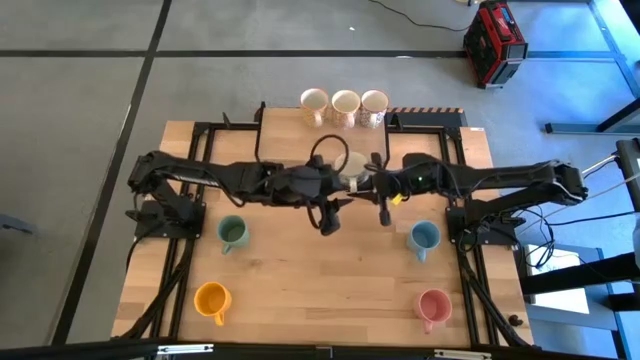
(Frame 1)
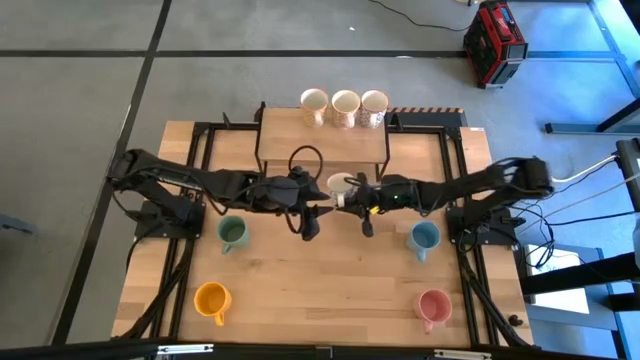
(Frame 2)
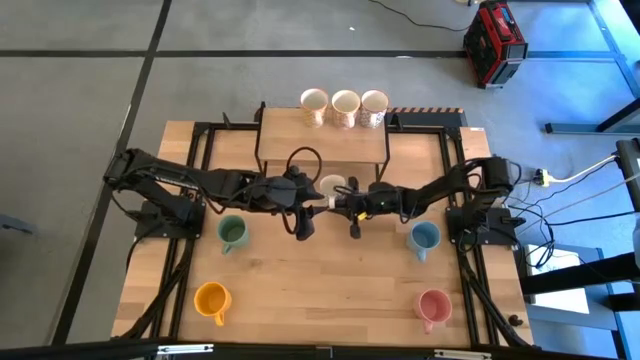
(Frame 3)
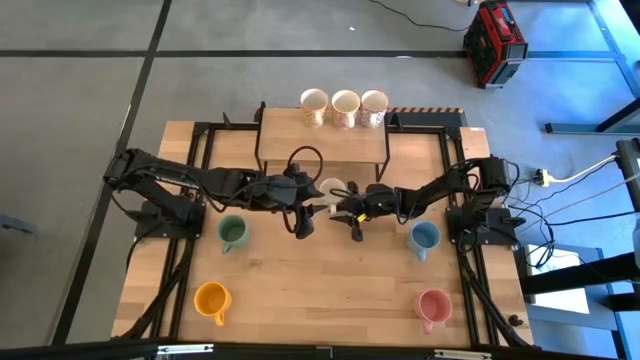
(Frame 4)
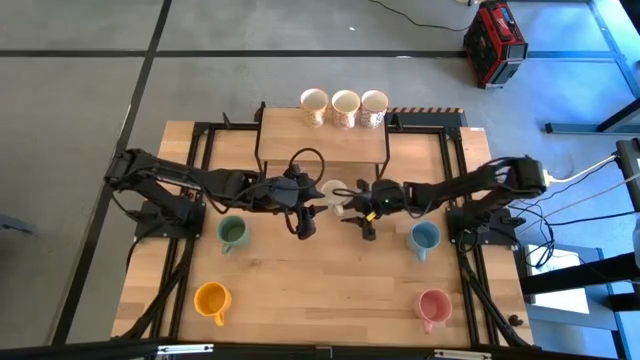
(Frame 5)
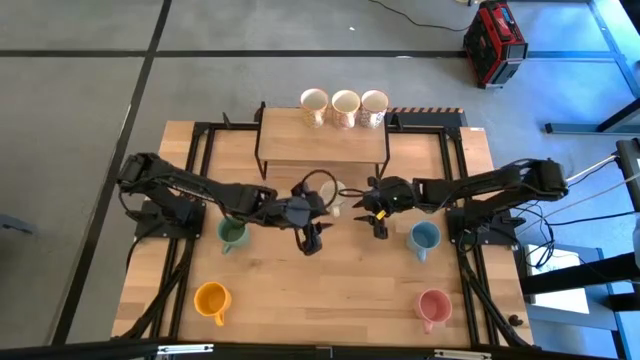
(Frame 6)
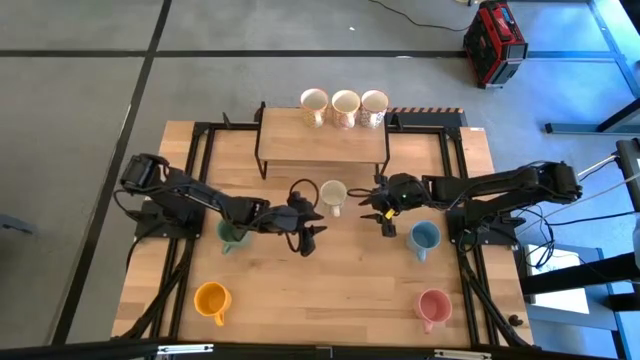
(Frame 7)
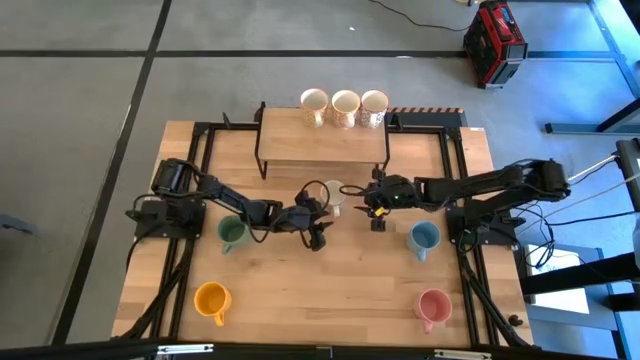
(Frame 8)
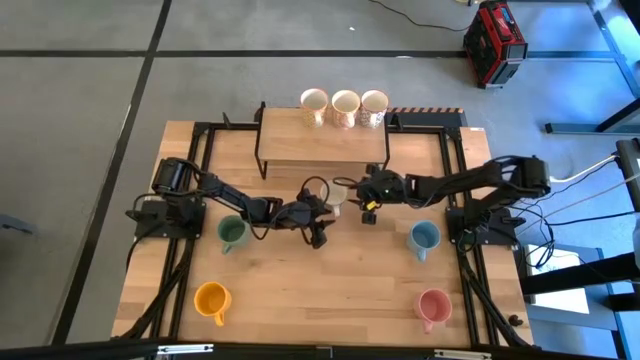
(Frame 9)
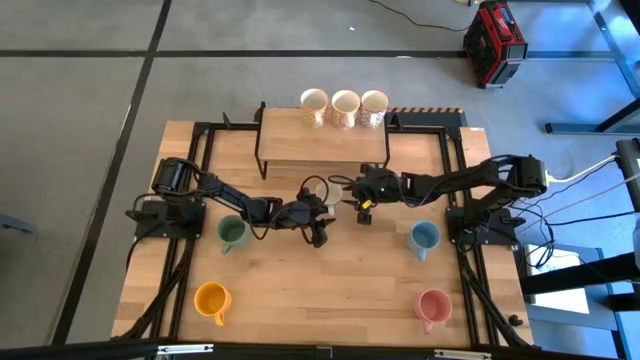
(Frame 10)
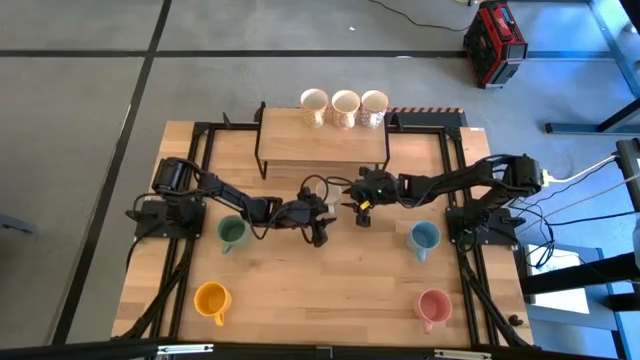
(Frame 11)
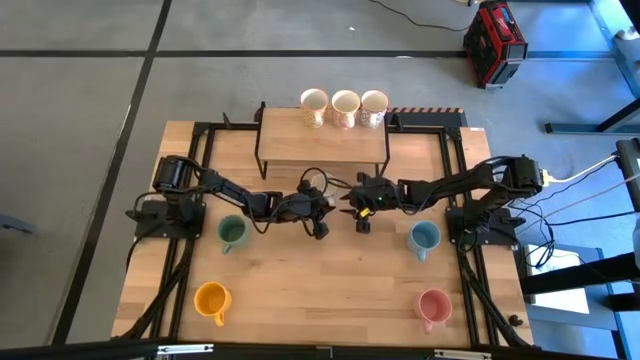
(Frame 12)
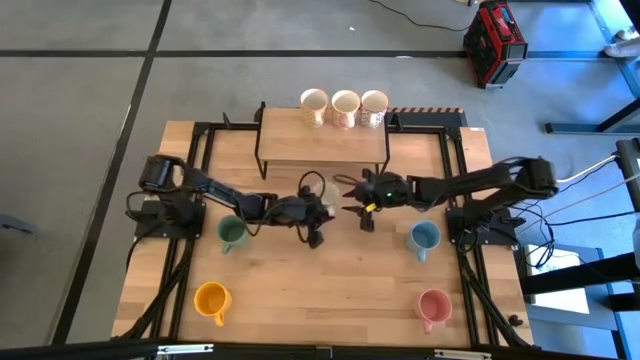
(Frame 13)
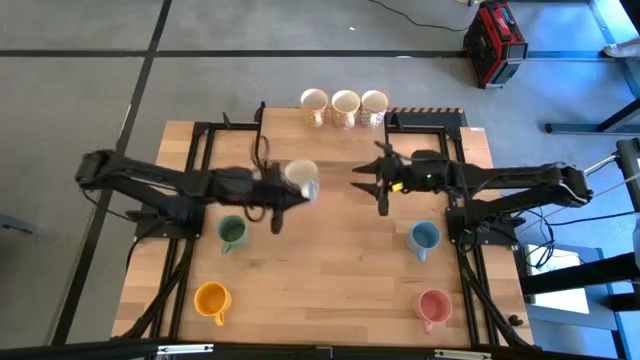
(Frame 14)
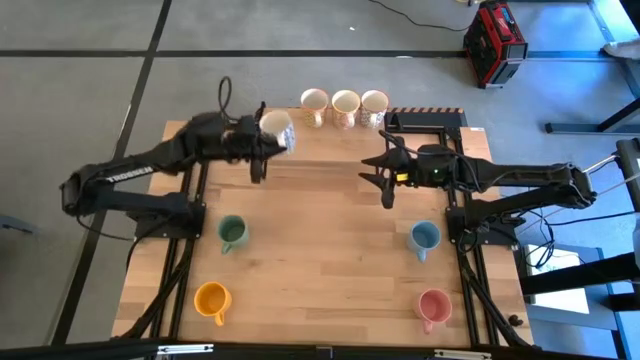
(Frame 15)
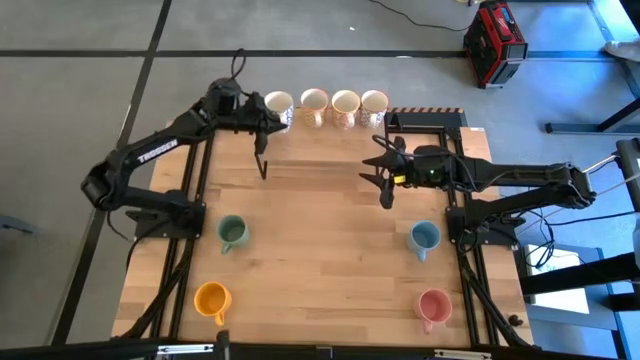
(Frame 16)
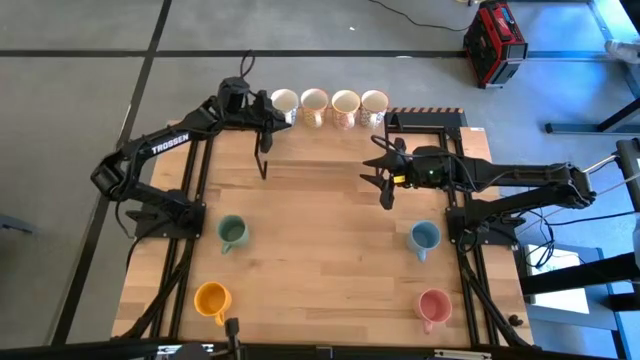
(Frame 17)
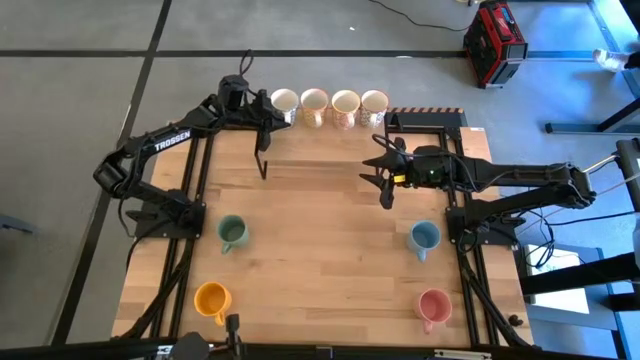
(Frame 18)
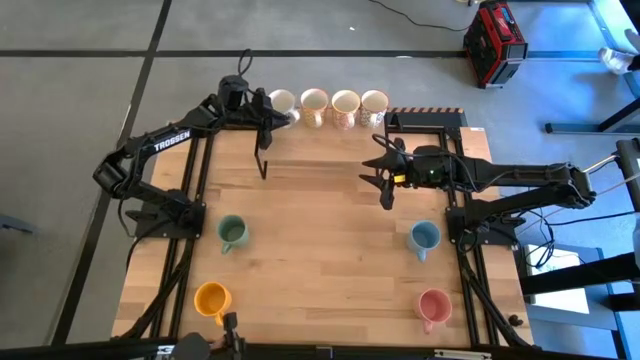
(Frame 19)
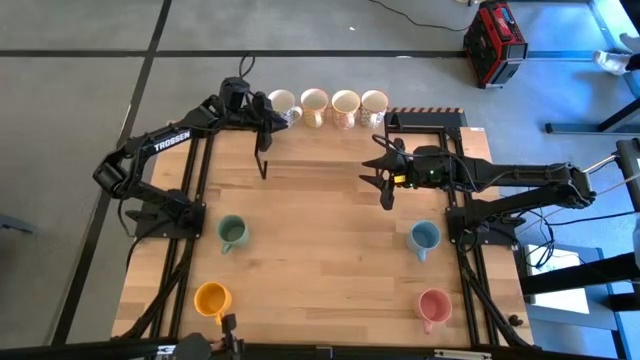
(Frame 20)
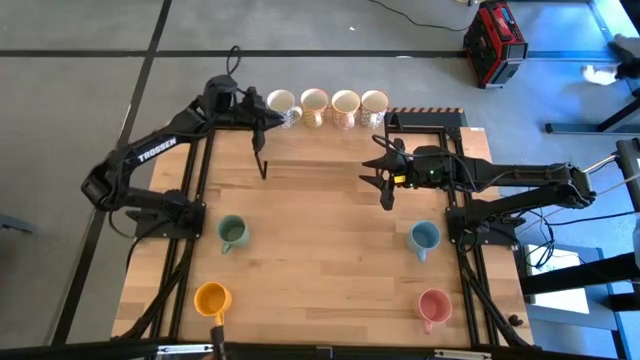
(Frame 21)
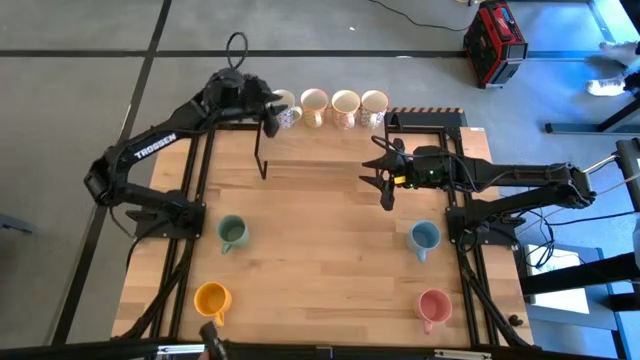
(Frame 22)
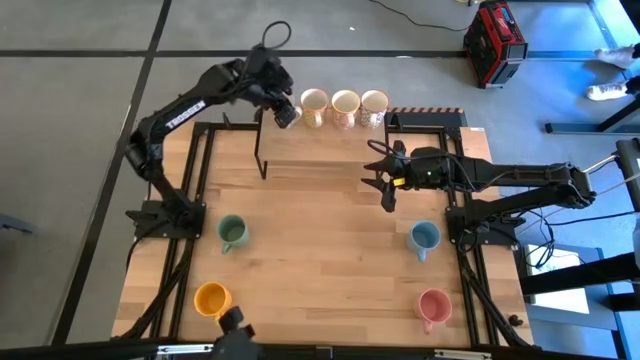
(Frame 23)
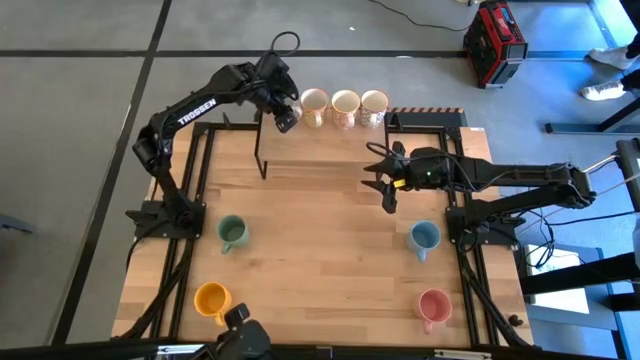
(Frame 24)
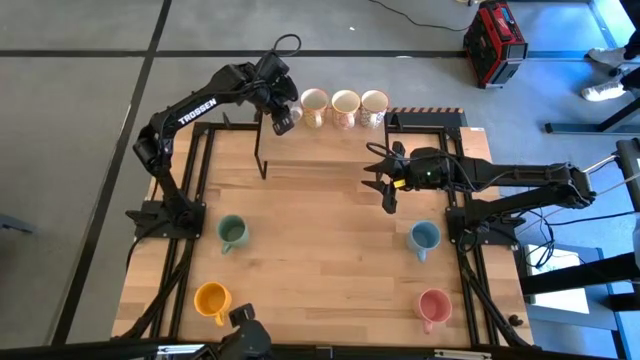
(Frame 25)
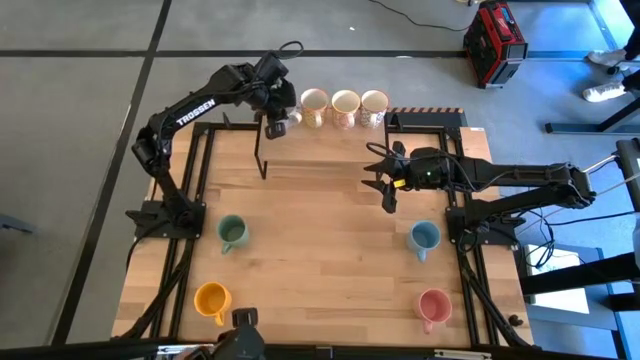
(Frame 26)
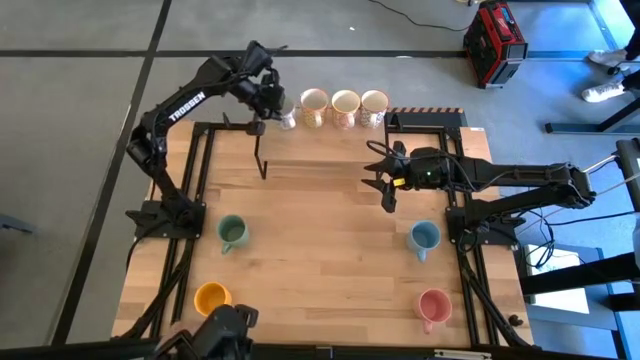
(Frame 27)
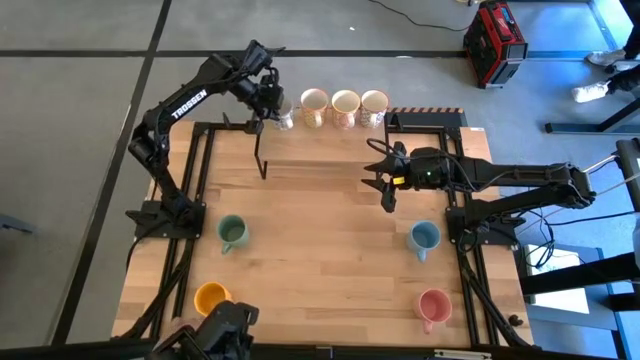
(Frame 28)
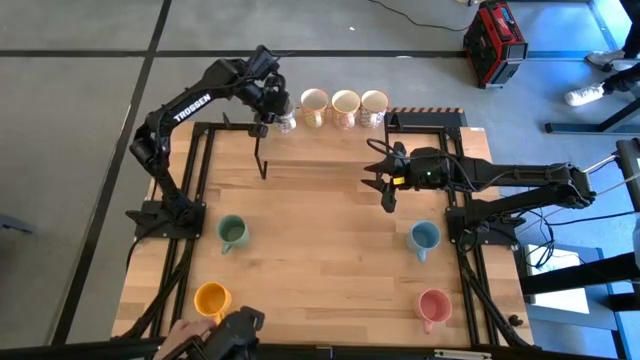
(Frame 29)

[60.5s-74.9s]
Task: Place coffee mugs
Put the blue patterned mug on the shelf

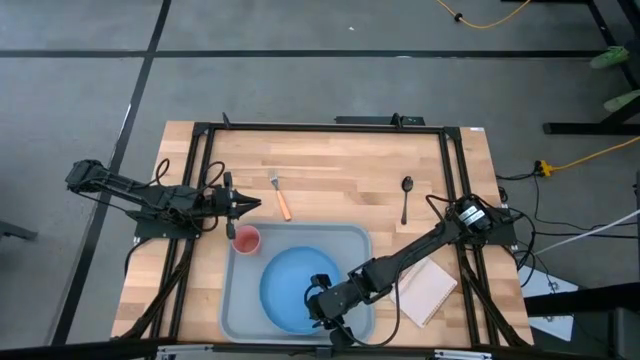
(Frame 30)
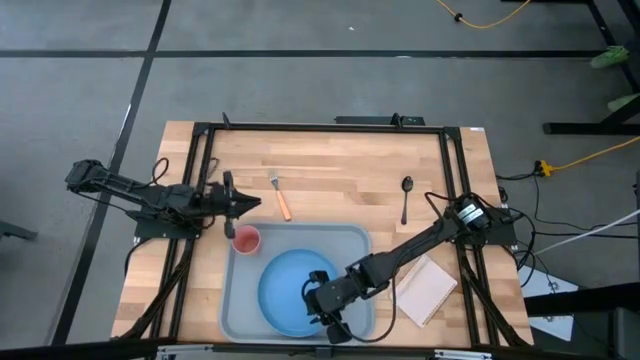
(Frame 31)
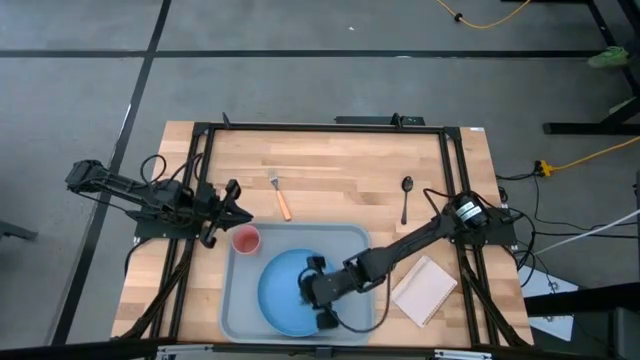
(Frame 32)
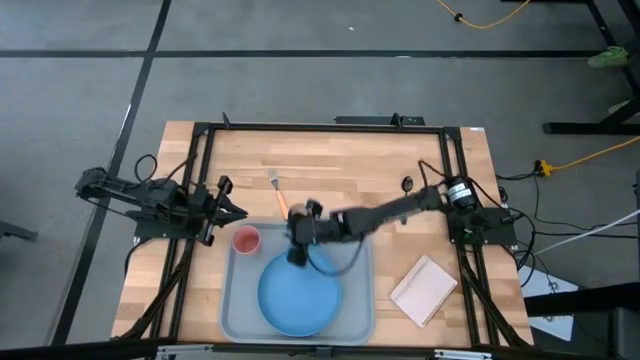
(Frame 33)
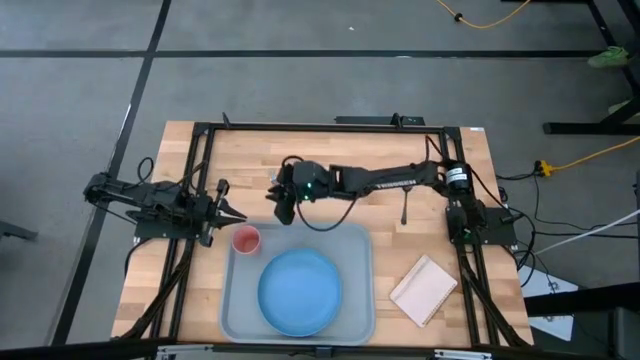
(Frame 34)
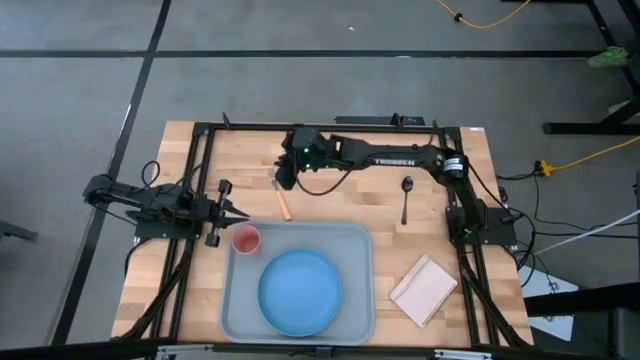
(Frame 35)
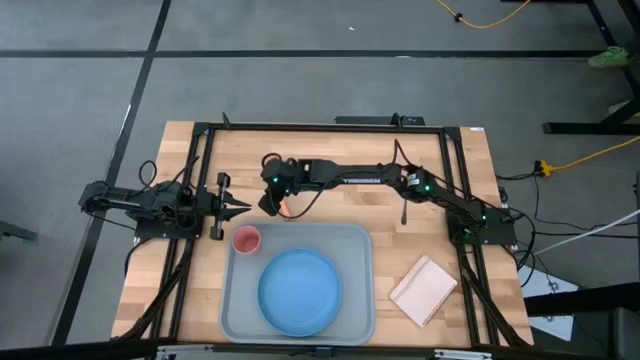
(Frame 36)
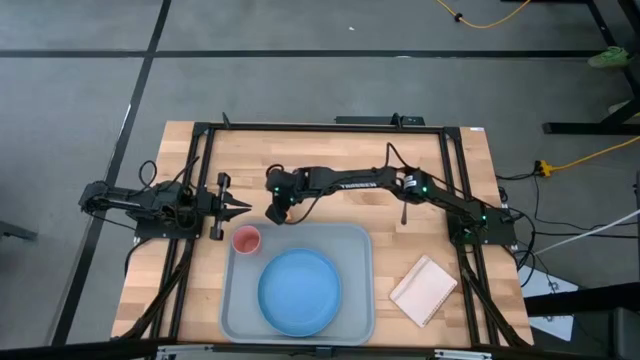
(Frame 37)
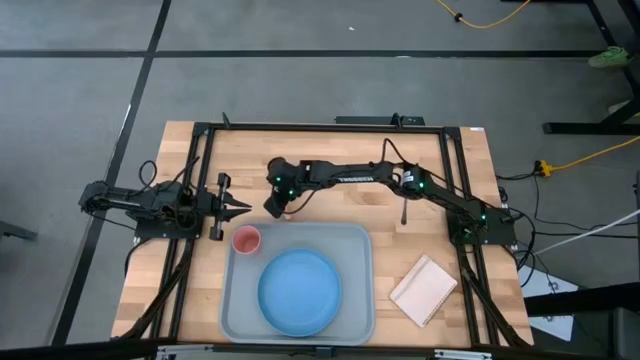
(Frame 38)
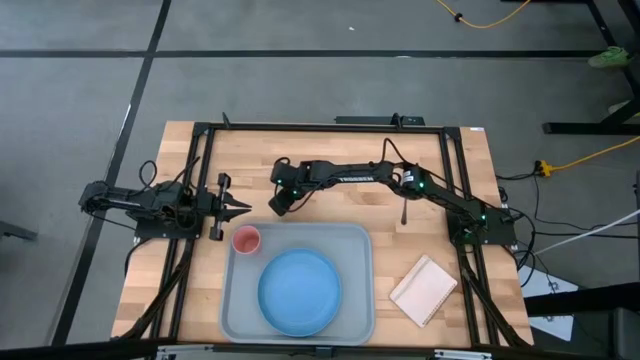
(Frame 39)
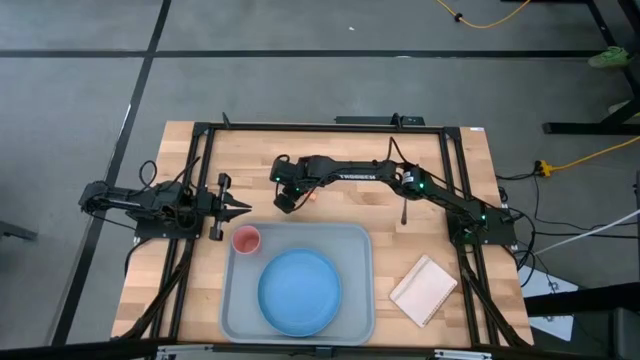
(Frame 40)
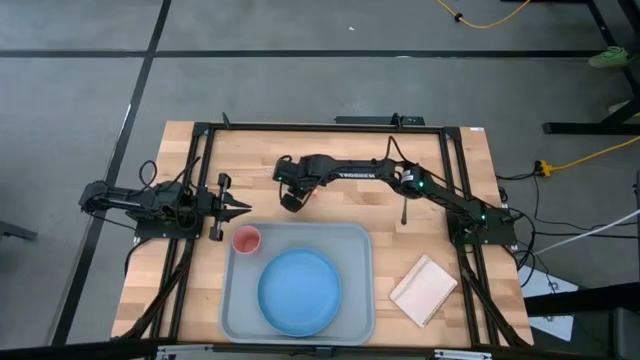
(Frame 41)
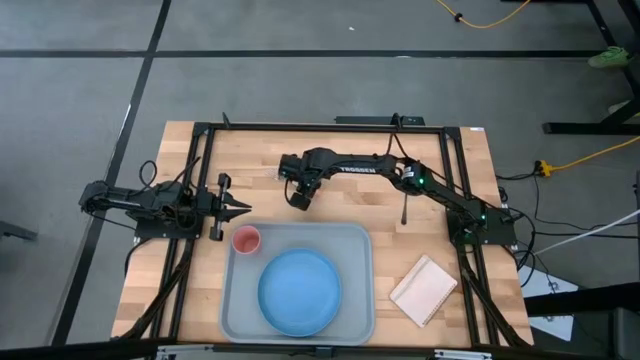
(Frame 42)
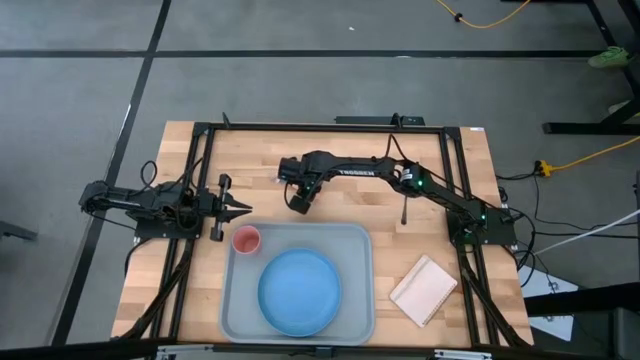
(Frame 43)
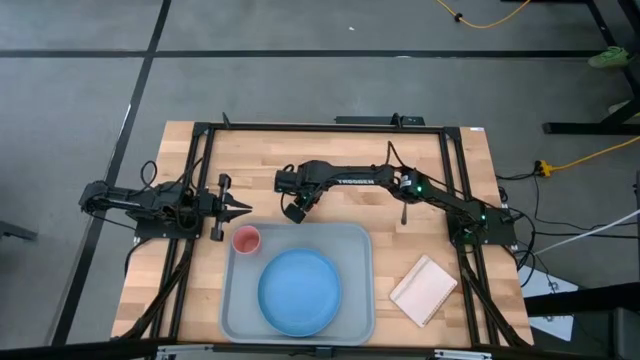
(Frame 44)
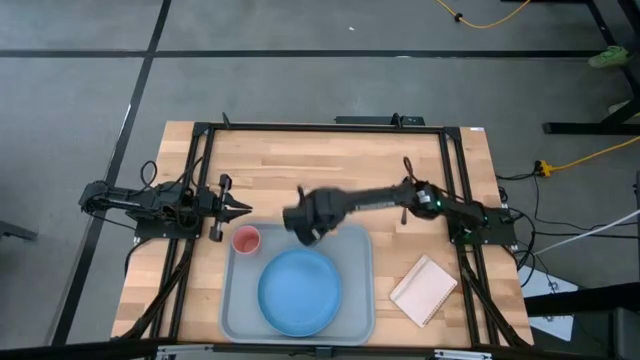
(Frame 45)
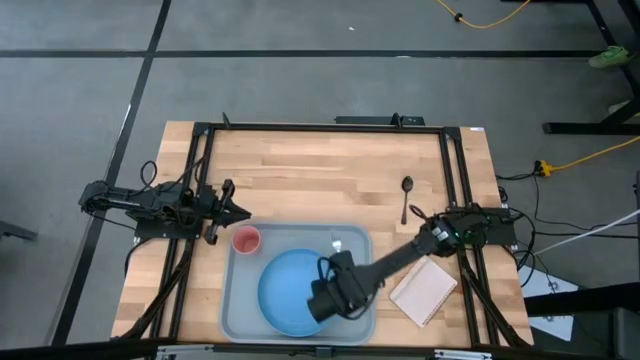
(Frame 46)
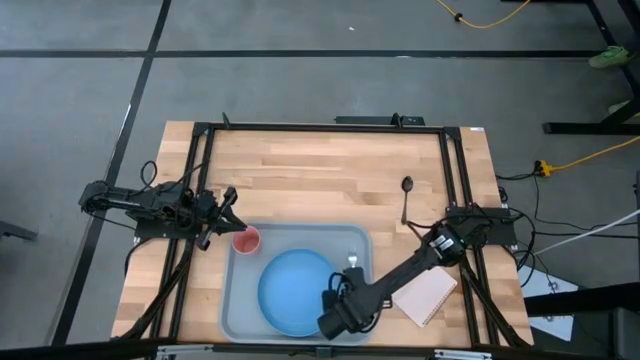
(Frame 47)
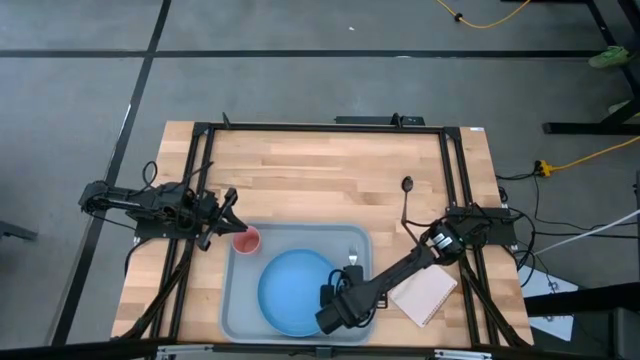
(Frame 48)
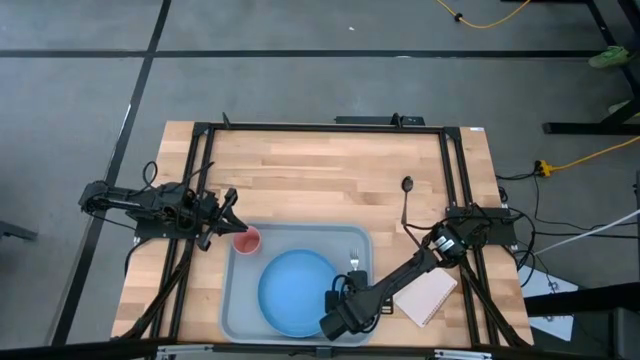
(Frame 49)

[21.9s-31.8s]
Task: Pick and place plate/cup/fork/spoon on tray
Put the orange fork to the right of the blue plate on the gray serving tray
